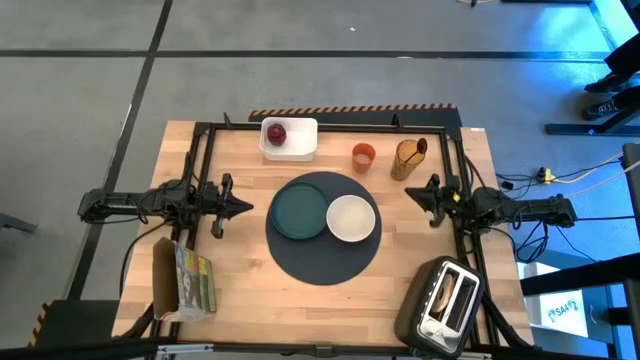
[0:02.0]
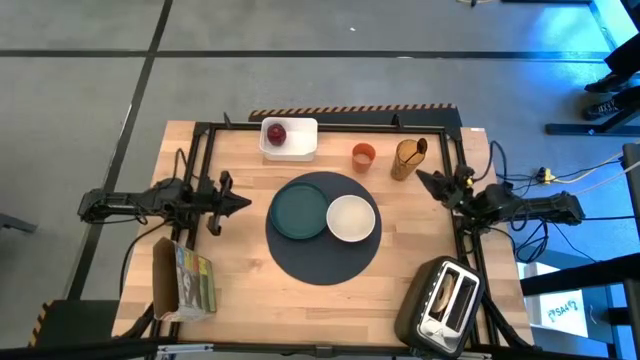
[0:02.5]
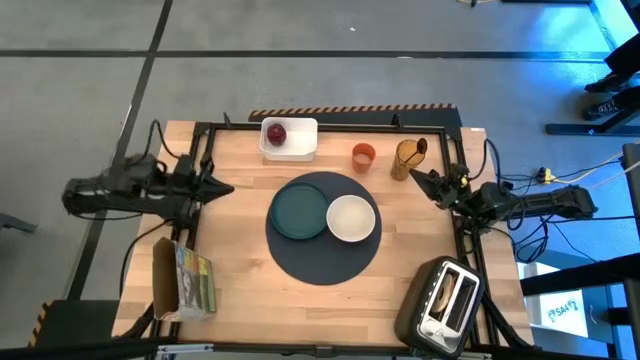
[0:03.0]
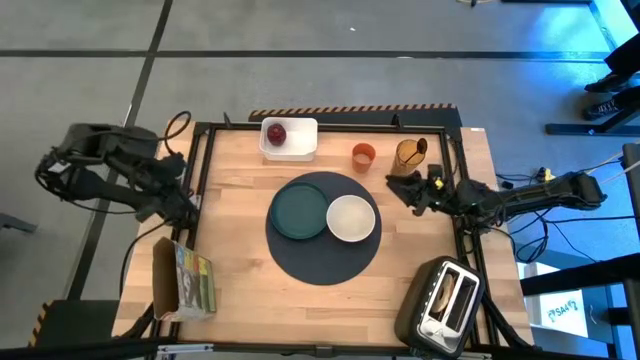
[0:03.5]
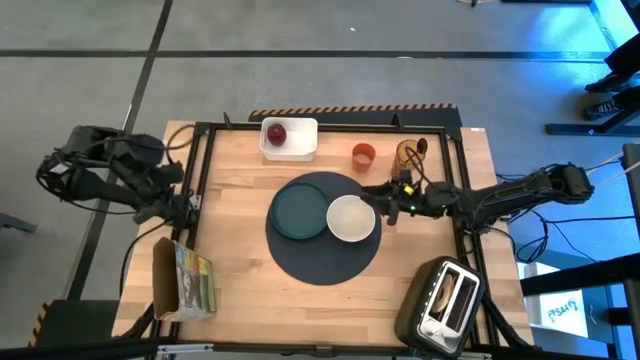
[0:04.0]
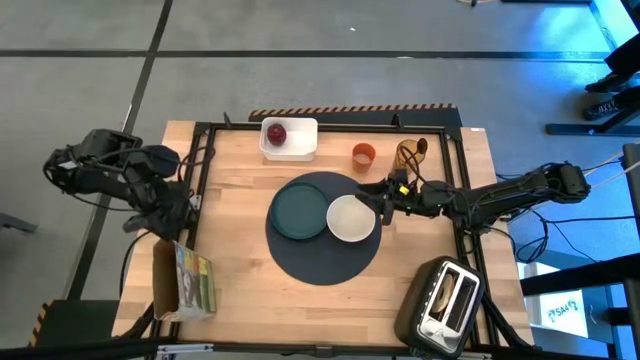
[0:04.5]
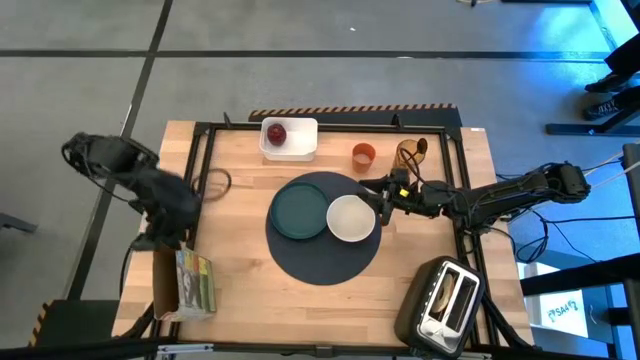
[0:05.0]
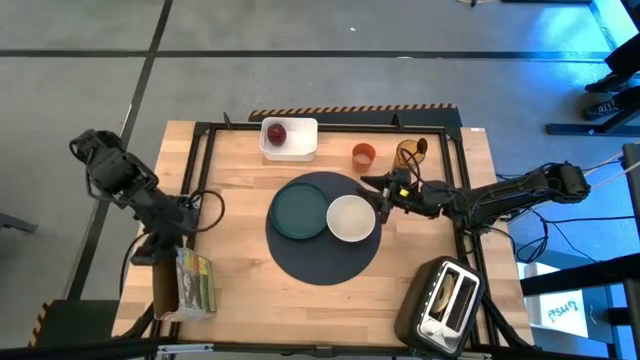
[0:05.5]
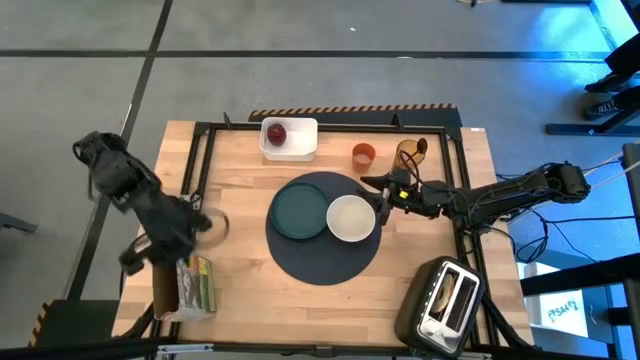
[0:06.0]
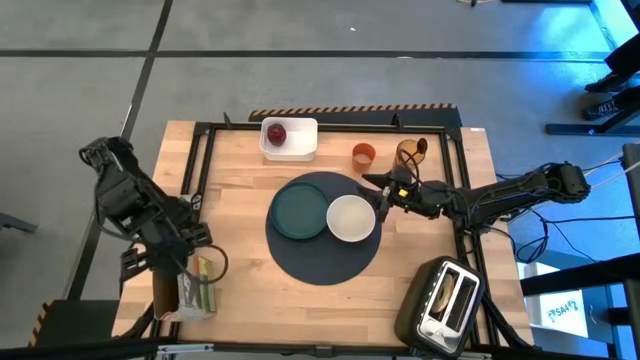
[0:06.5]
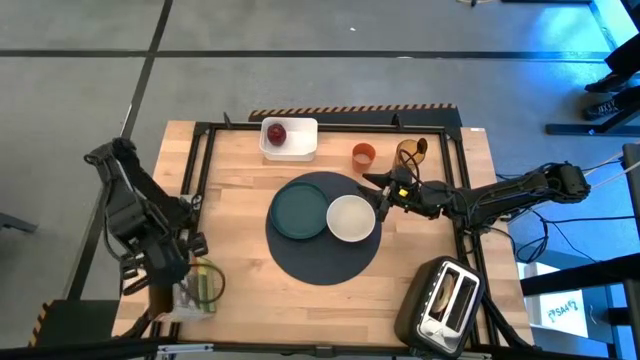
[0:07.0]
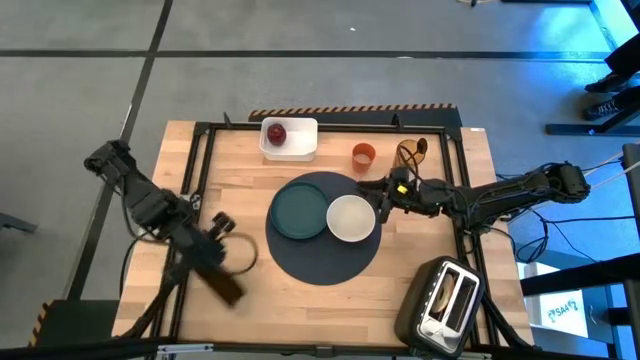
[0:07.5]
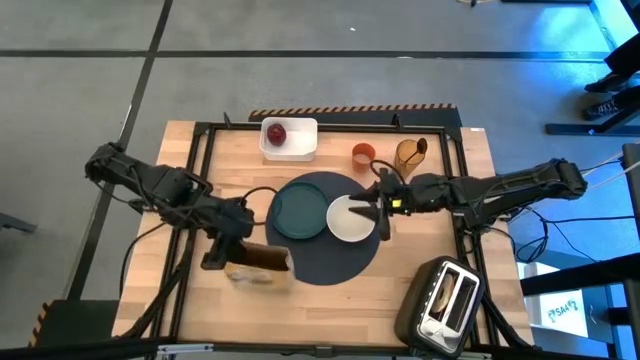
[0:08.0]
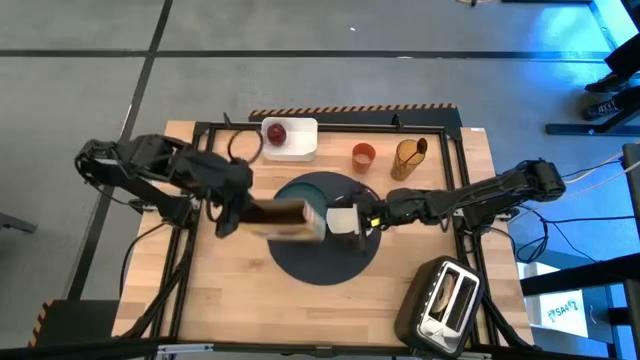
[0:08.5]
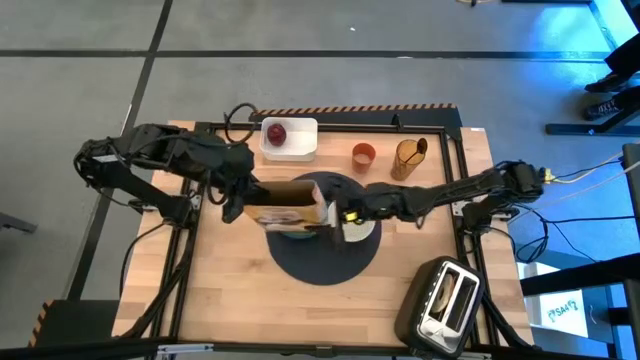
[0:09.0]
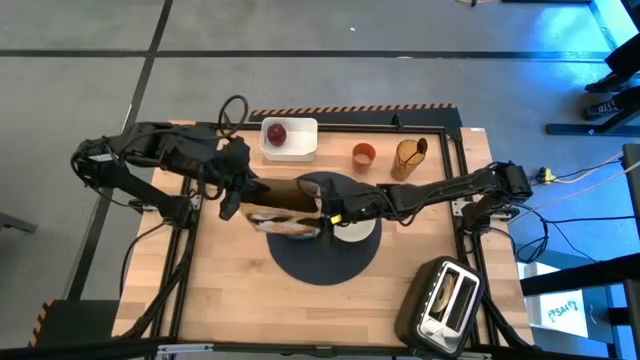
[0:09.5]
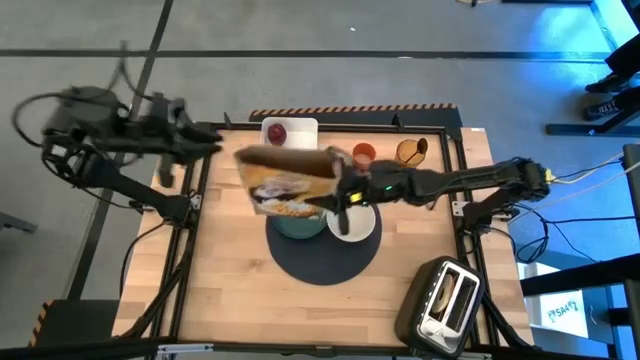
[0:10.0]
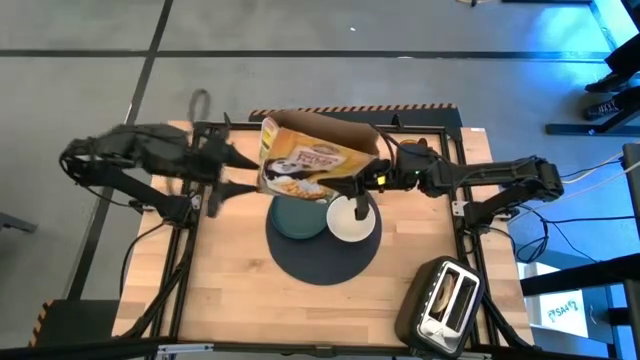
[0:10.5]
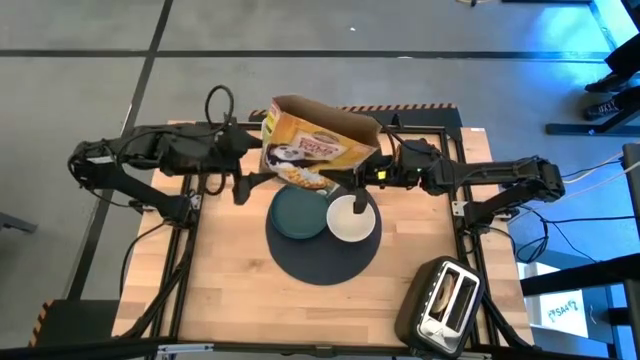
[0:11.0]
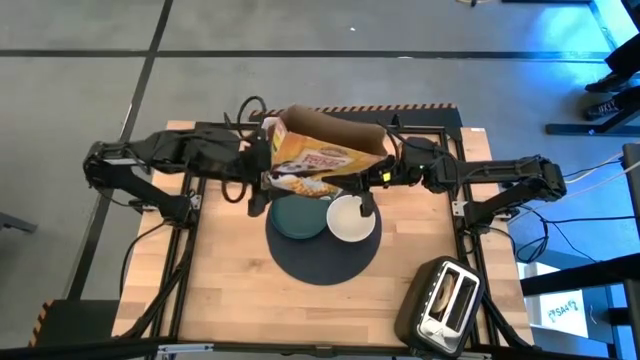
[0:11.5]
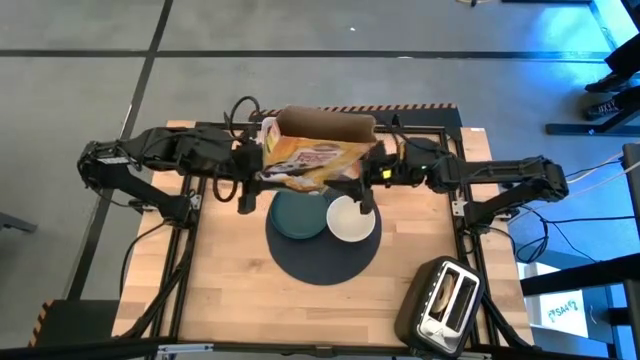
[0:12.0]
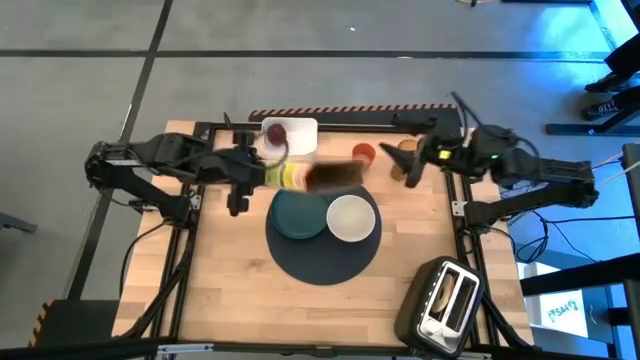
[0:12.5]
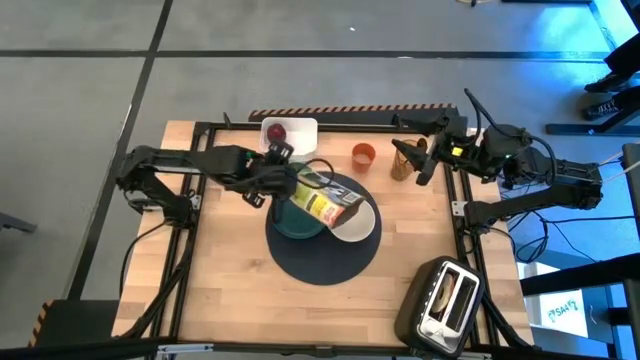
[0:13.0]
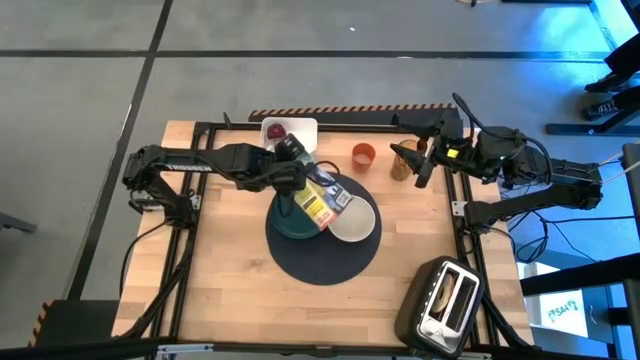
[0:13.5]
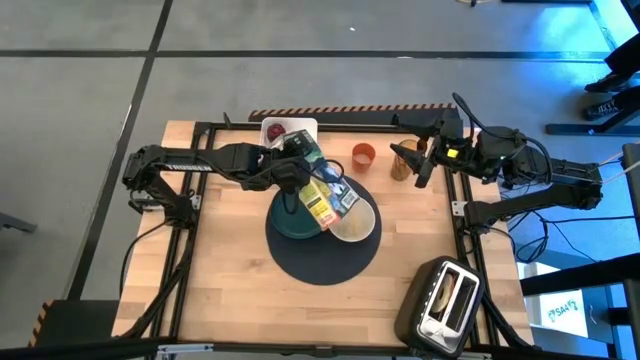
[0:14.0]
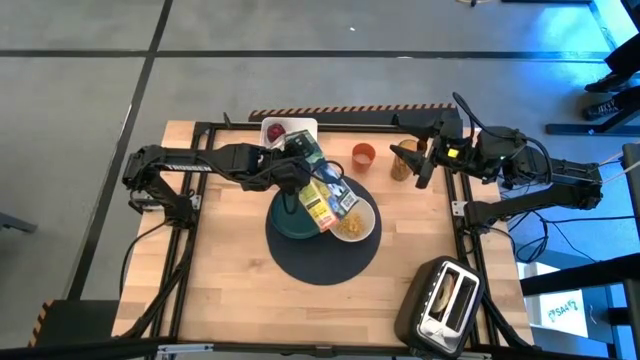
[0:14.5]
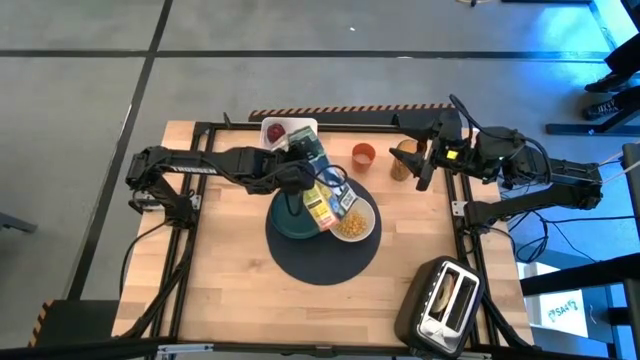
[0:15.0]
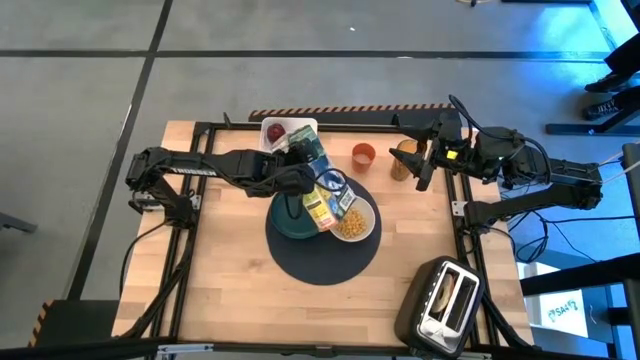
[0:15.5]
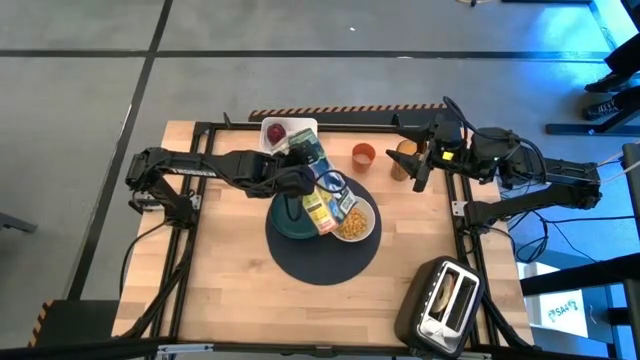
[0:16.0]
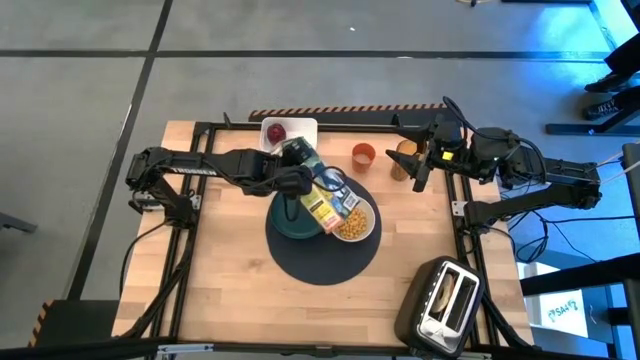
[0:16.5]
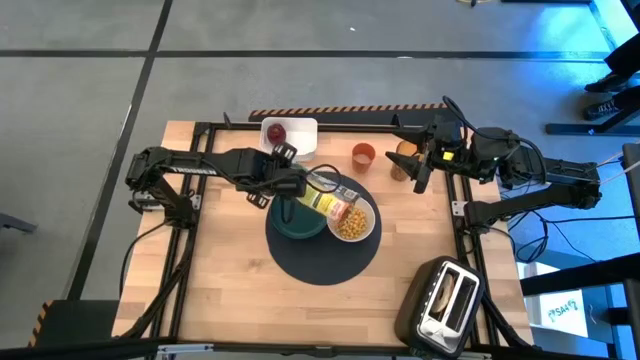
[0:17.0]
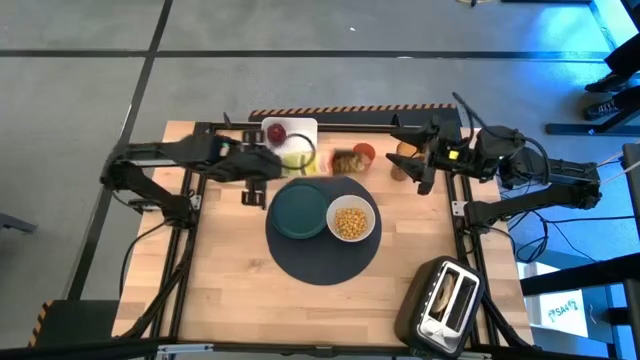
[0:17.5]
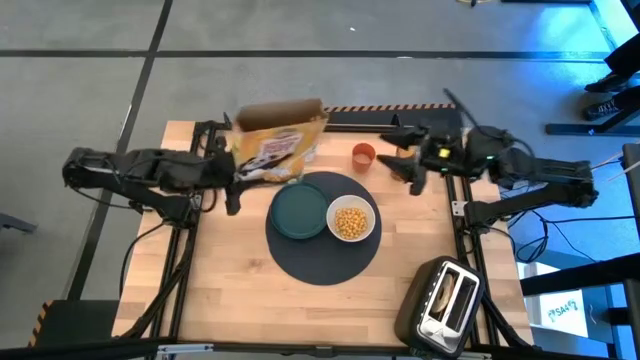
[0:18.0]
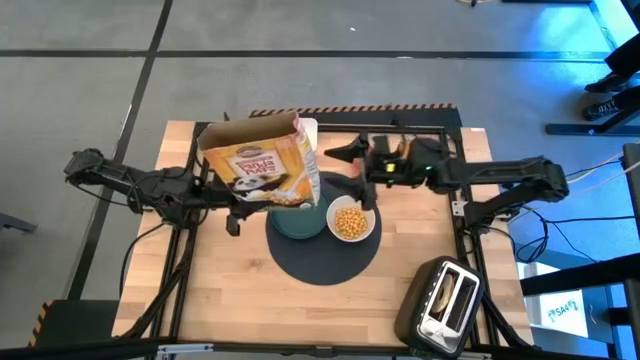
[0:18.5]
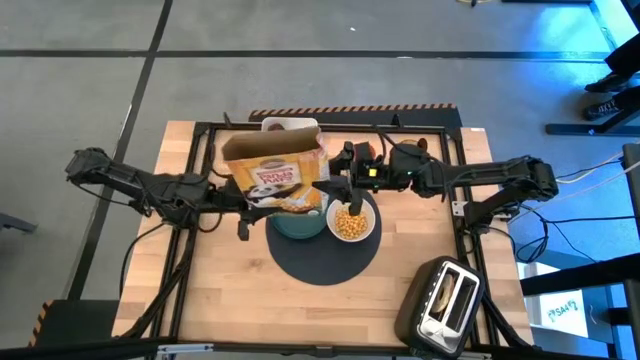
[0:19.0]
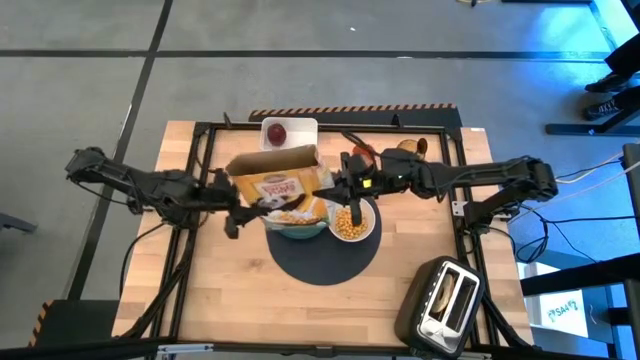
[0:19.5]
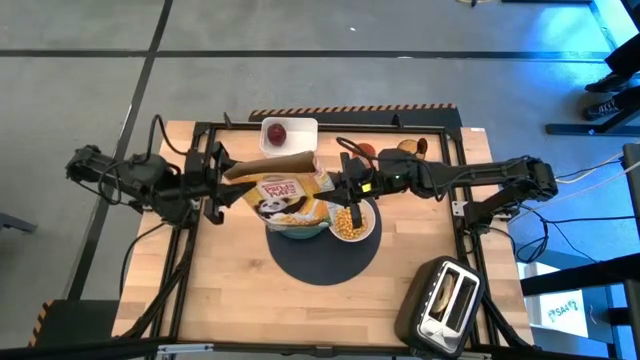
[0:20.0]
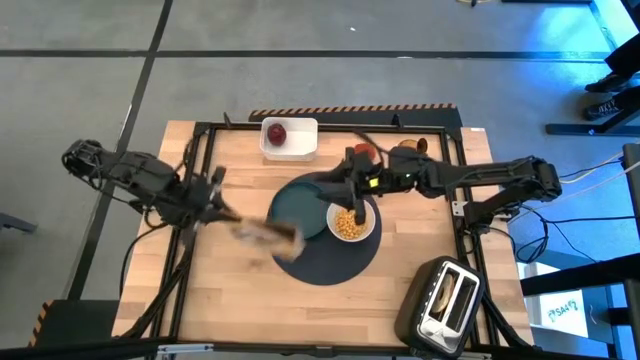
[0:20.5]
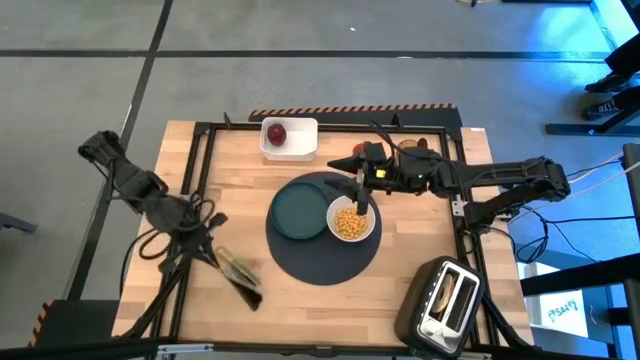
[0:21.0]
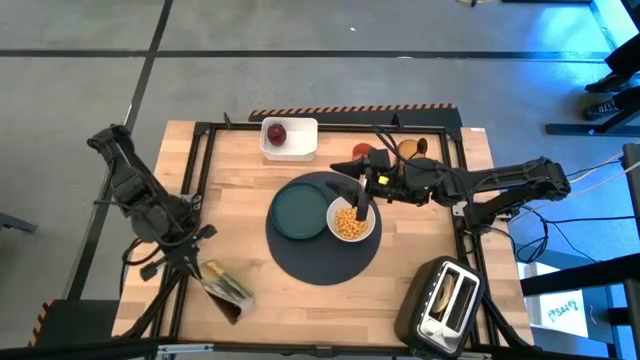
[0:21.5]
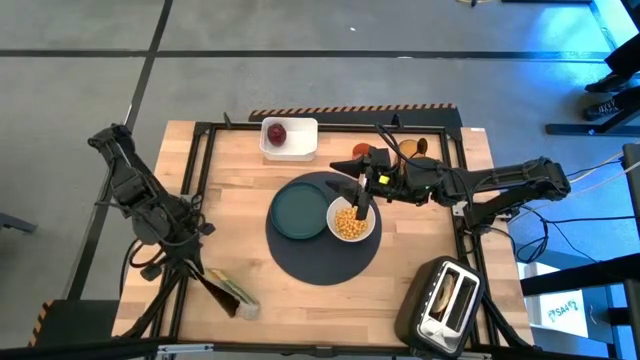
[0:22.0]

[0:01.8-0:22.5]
Task: Arrange a breakfast setting
Pour the cereal from the cereal box into the white bowl
